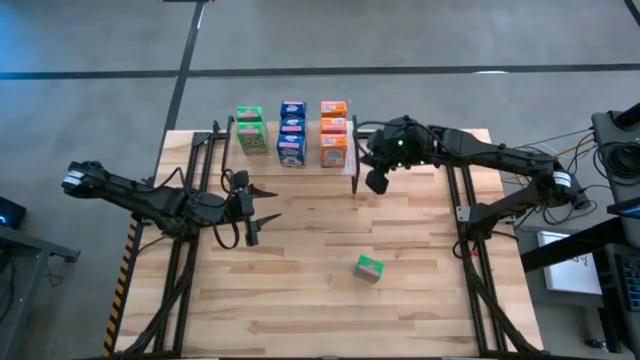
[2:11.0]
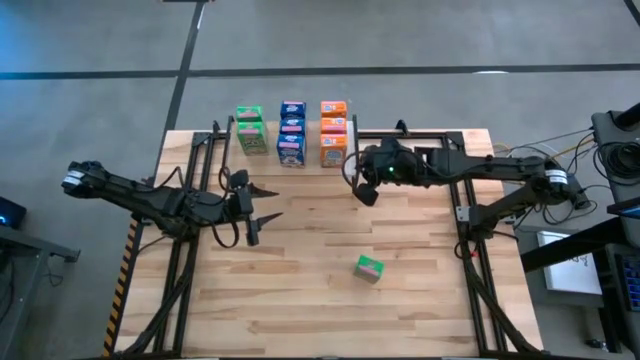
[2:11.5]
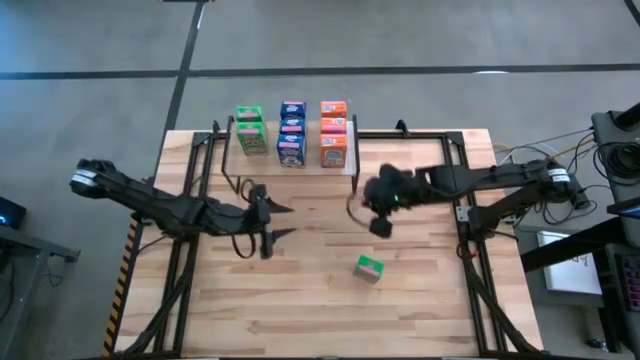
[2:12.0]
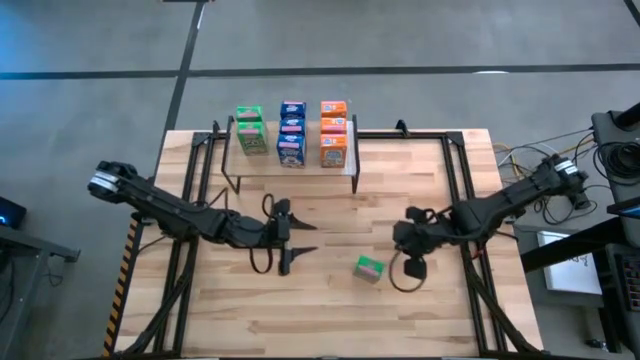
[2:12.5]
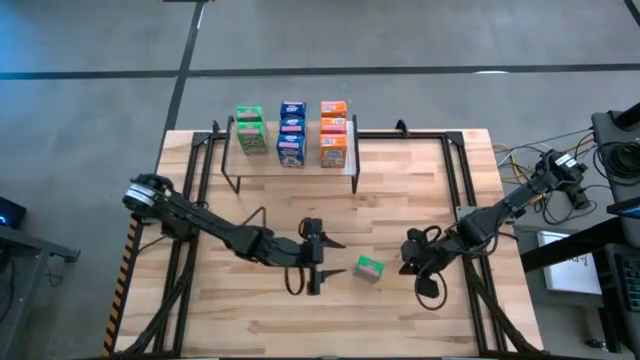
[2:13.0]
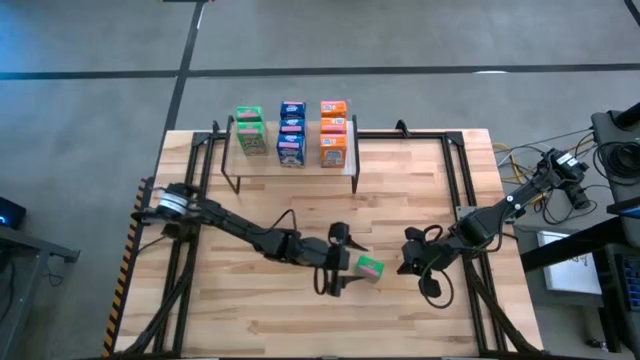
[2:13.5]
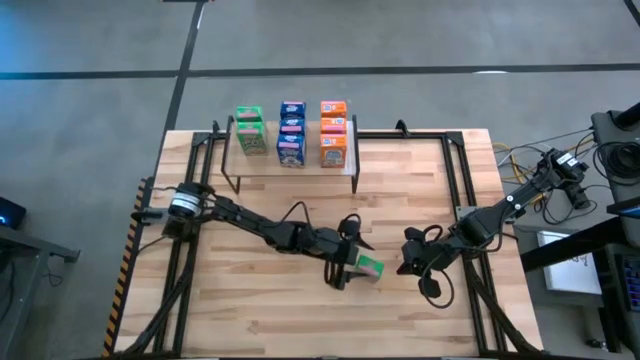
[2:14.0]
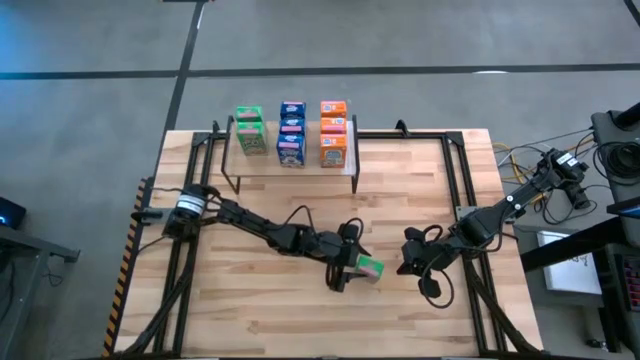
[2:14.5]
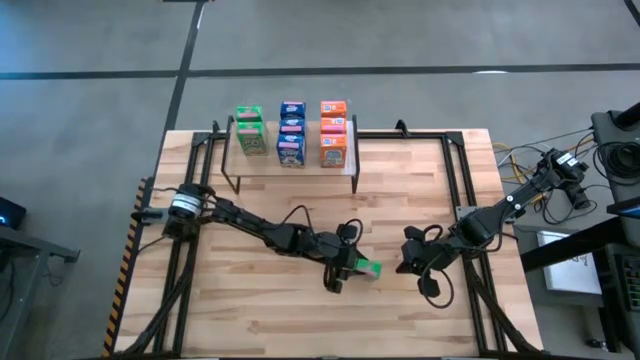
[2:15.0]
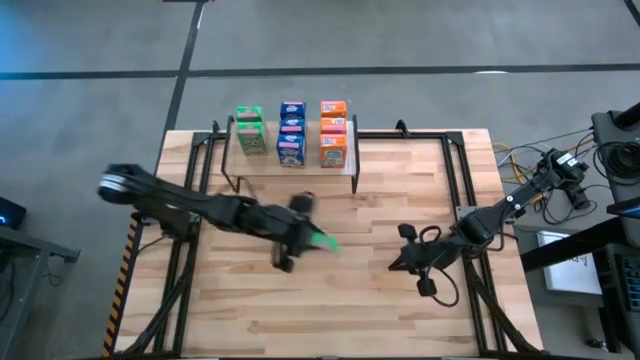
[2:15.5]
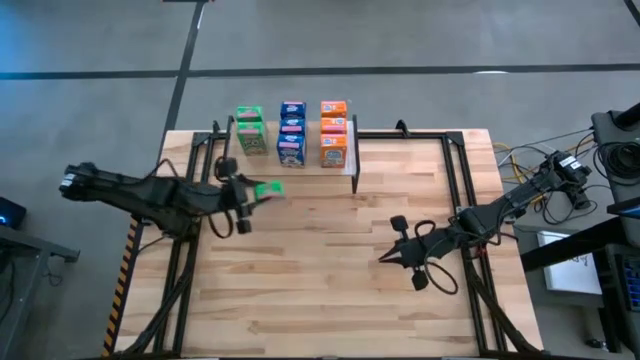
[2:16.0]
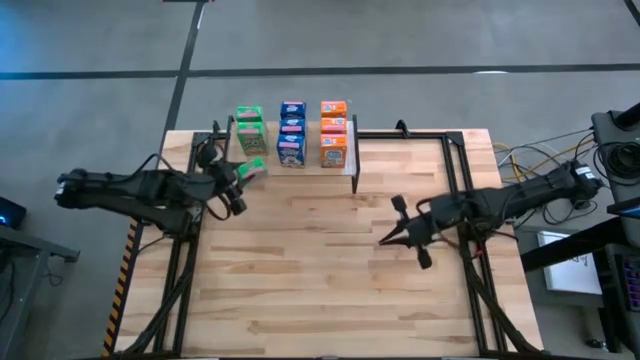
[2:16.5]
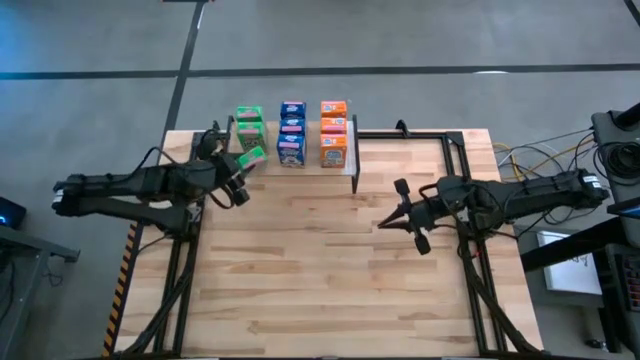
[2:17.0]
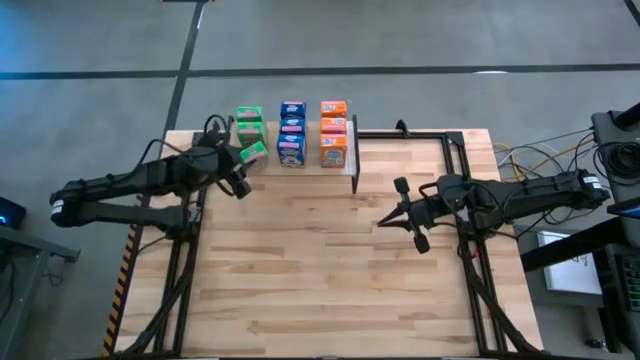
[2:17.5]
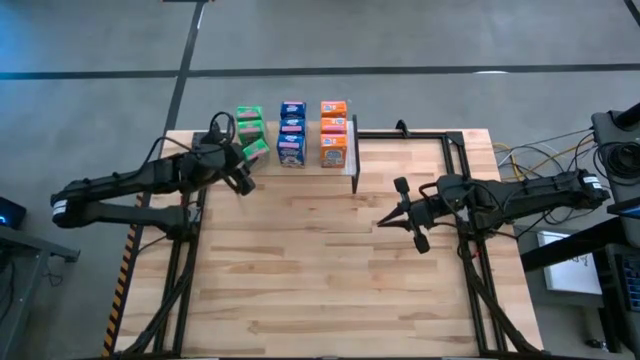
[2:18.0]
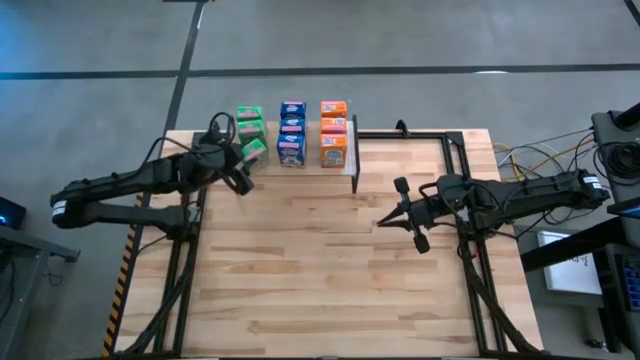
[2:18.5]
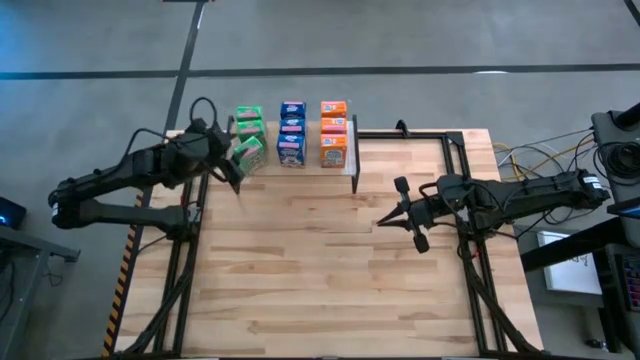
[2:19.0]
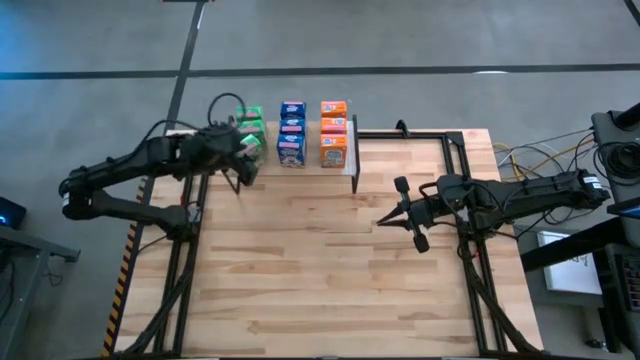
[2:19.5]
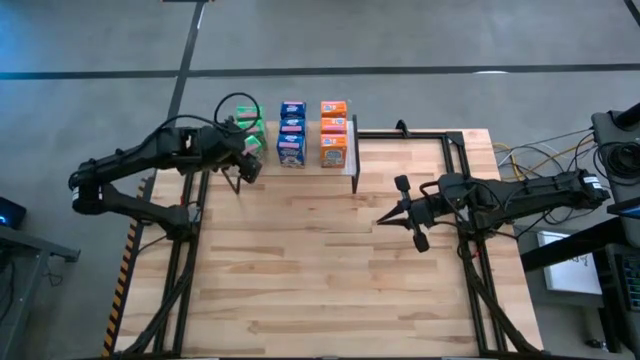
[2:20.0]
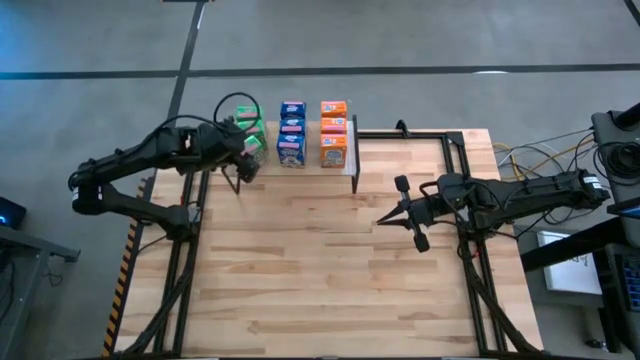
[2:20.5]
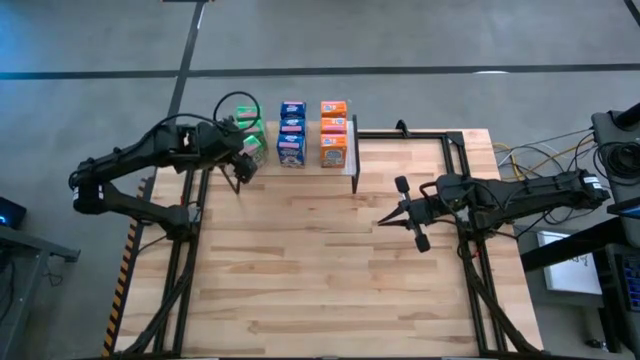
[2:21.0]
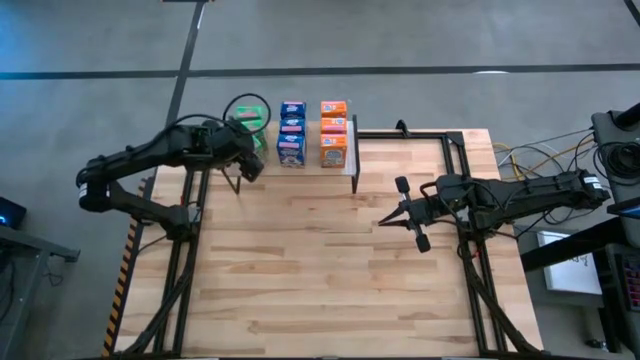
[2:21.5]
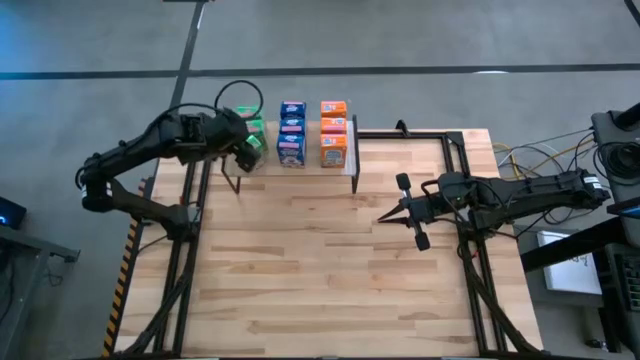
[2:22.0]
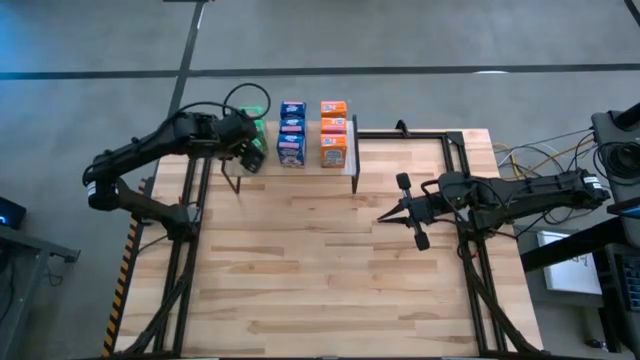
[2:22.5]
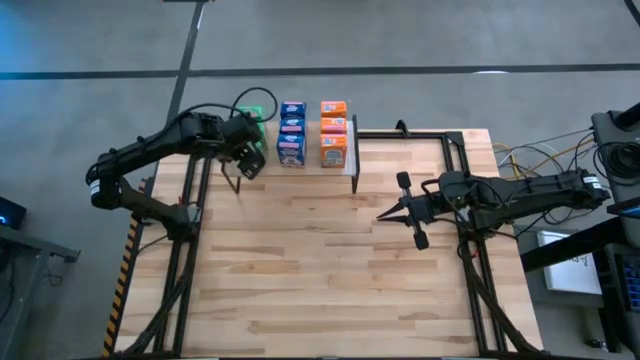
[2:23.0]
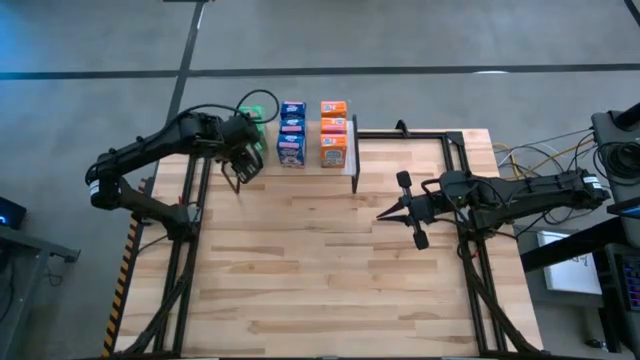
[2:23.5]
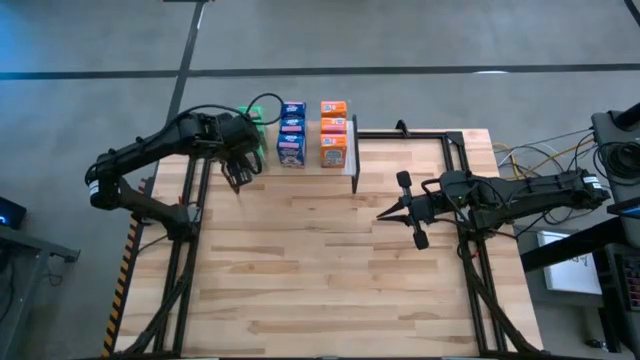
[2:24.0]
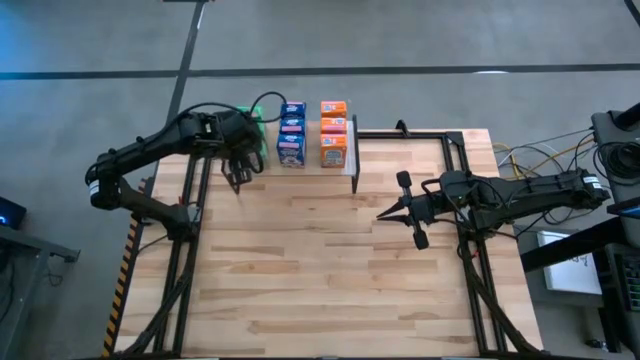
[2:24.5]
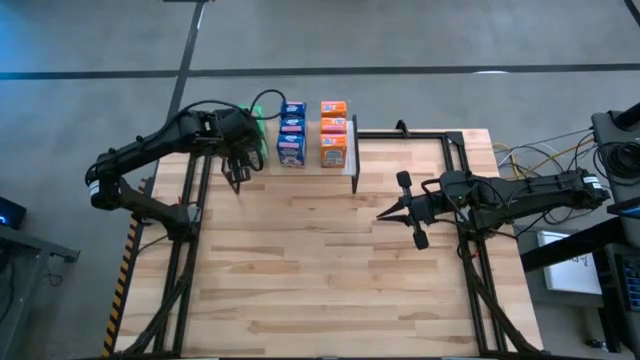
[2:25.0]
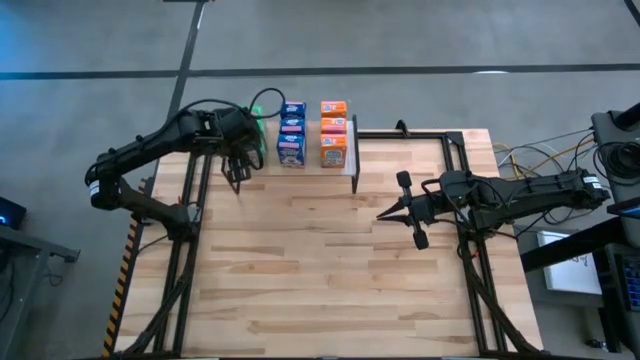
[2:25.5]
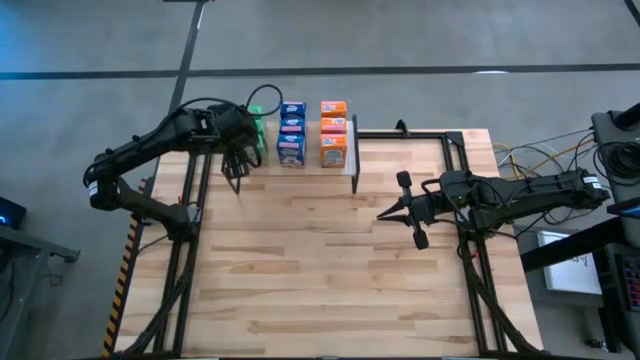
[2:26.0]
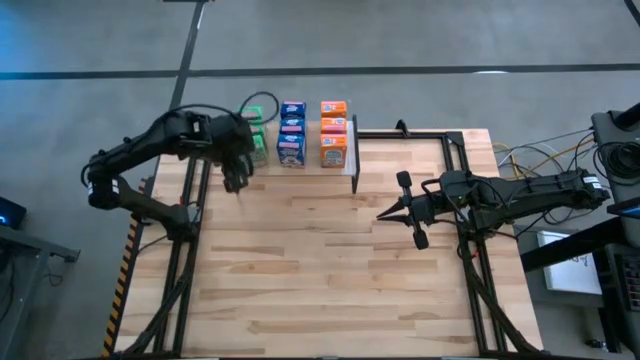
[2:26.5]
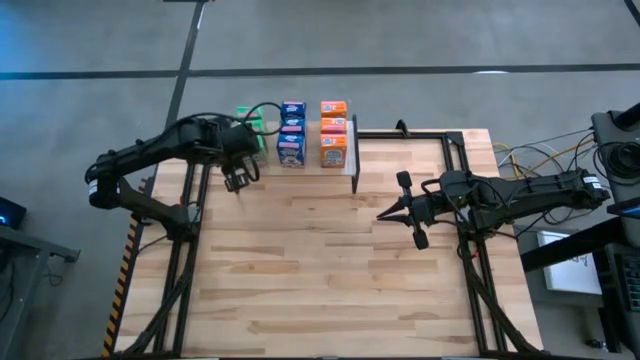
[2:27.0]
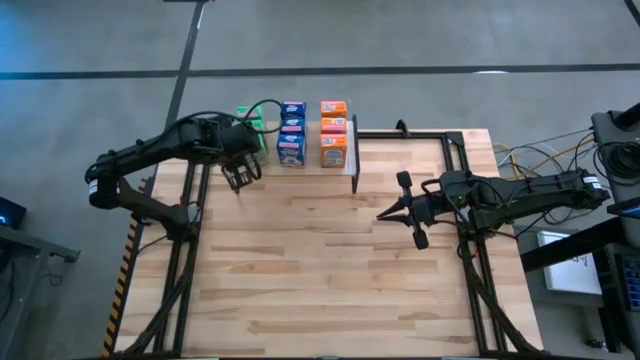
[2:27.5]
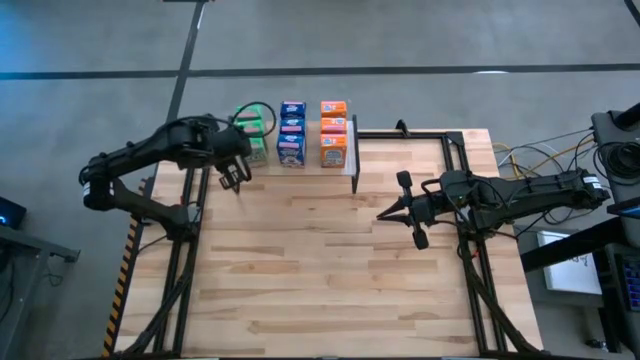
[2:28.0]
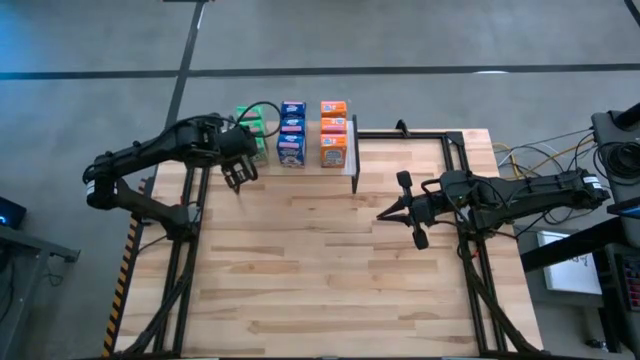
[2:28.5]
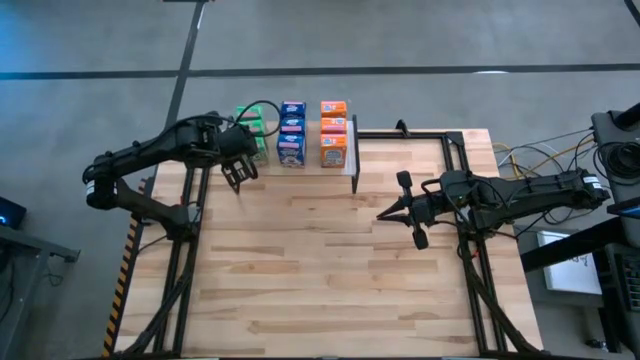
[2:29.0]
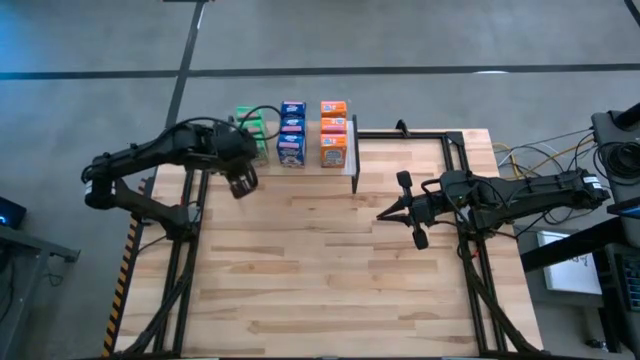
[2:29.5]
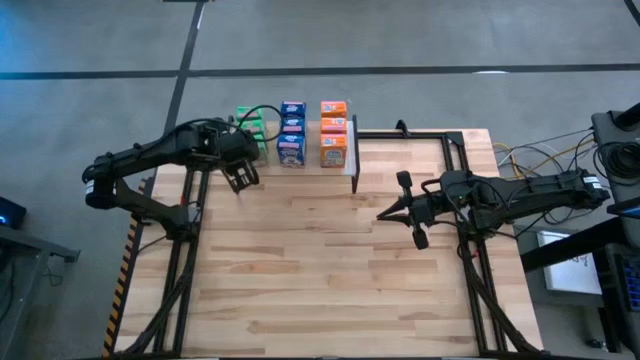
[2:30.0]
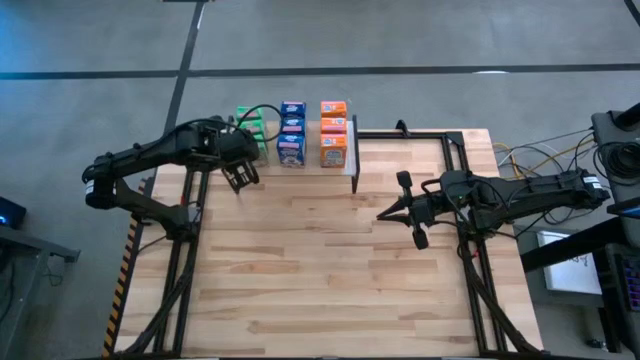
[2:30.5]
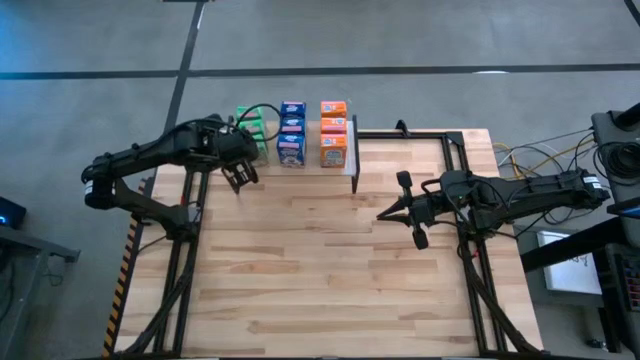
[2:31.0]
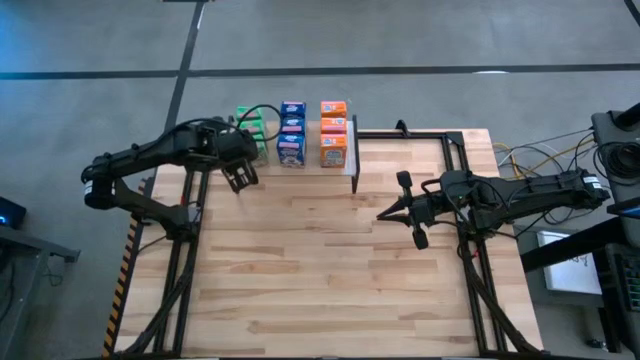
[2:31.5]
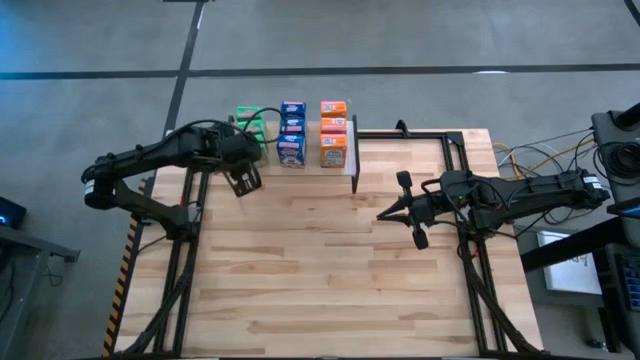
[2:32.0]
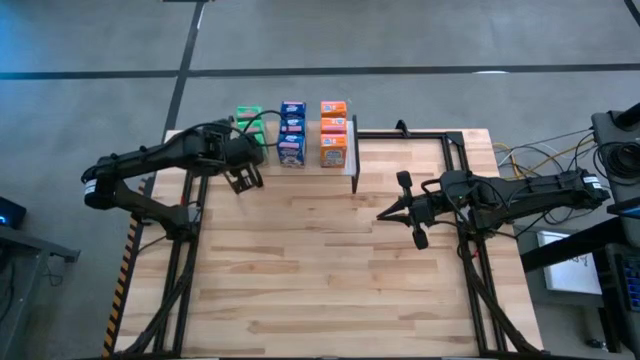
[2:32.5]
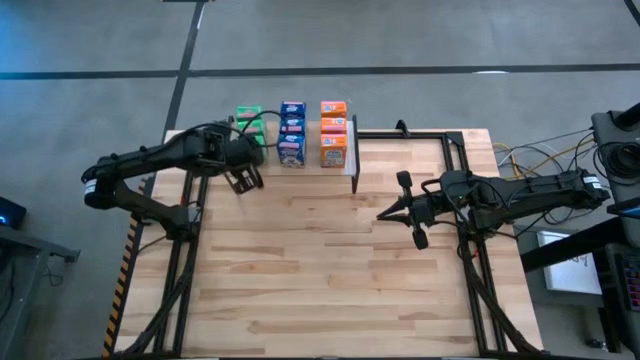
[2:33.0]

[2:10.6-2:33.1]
Task: Stack cereal on shelf
Put the green cereal box on the shelf aligned with the other green cereal boxes
